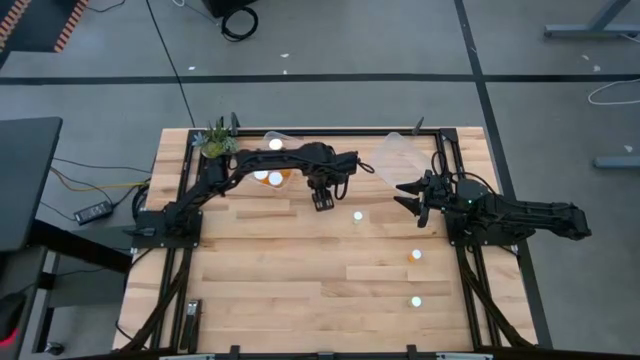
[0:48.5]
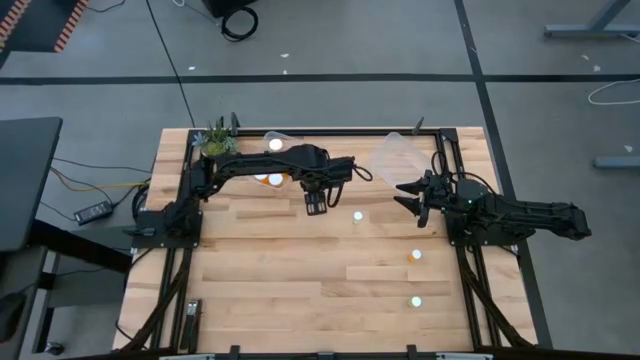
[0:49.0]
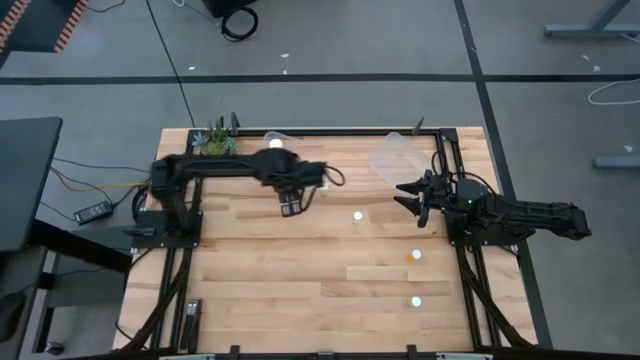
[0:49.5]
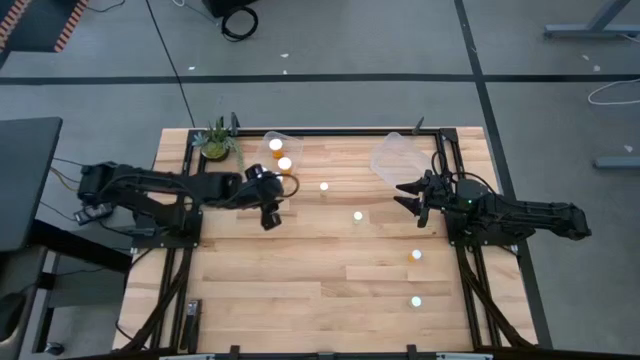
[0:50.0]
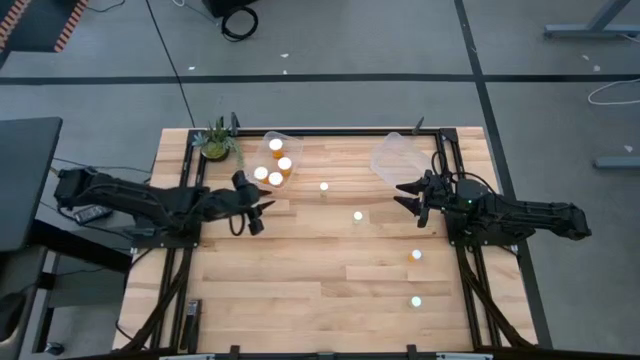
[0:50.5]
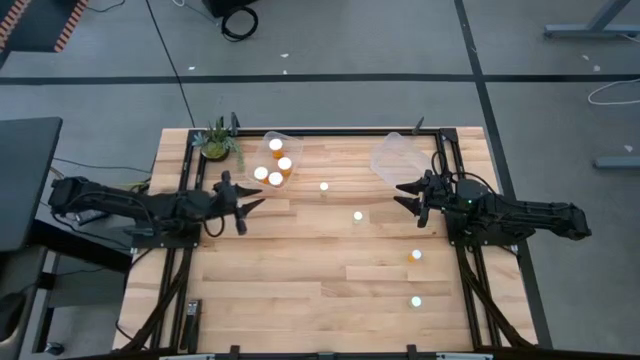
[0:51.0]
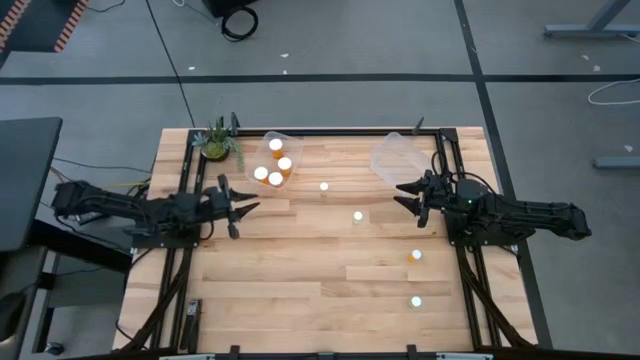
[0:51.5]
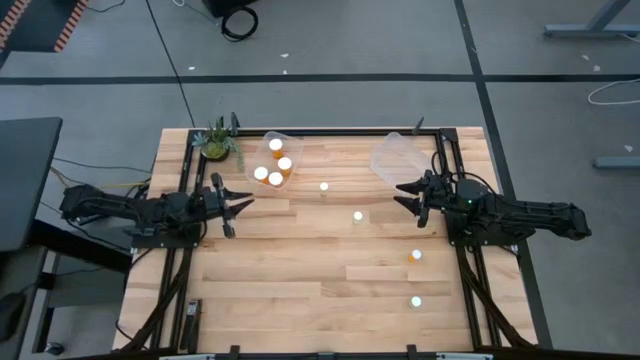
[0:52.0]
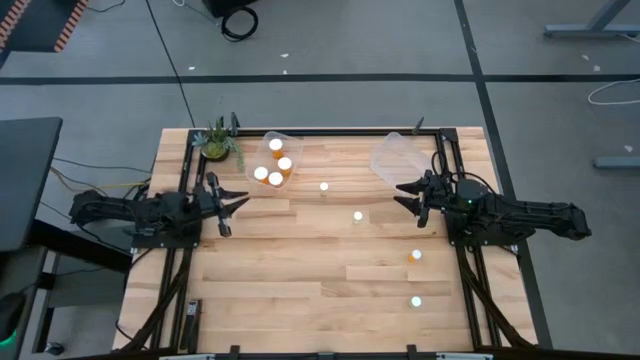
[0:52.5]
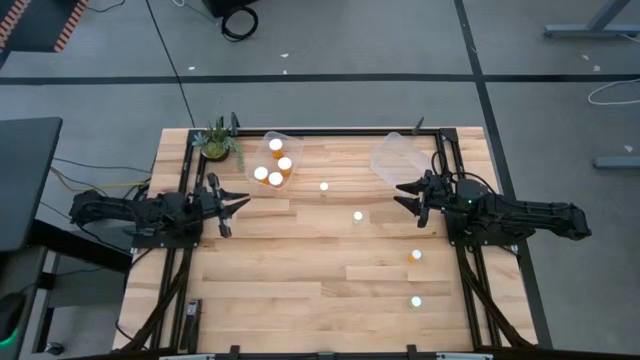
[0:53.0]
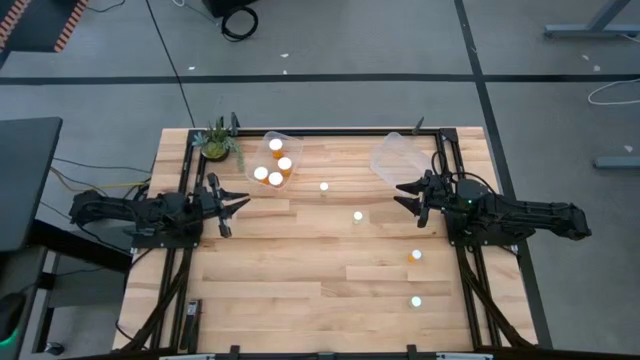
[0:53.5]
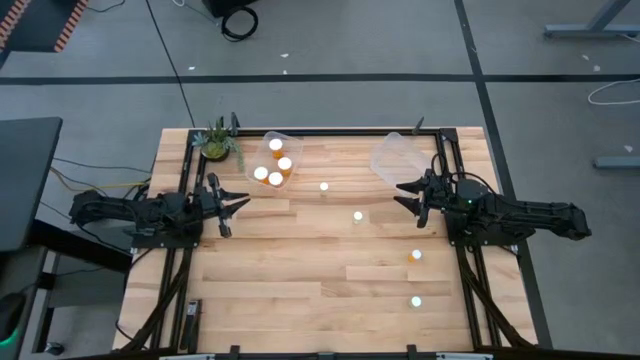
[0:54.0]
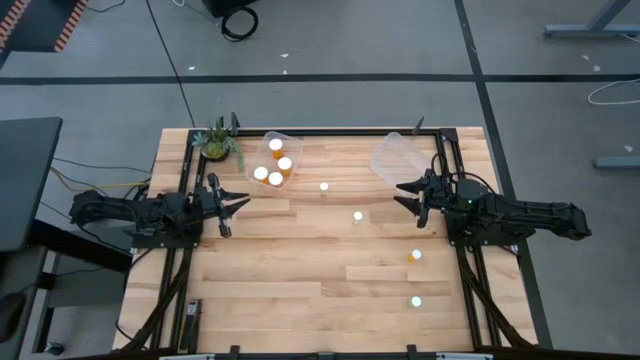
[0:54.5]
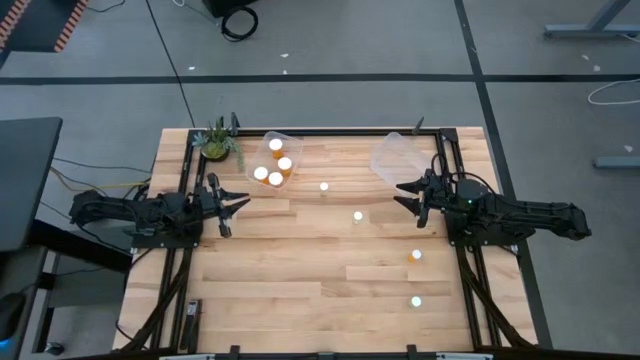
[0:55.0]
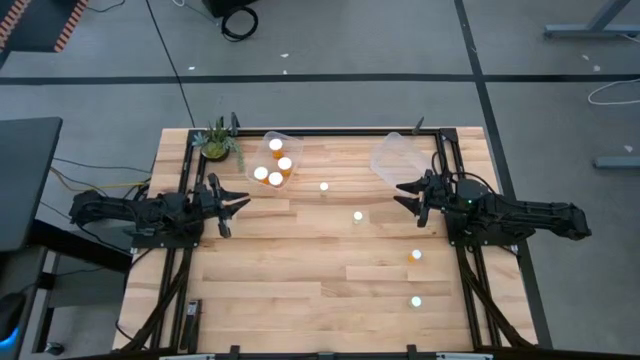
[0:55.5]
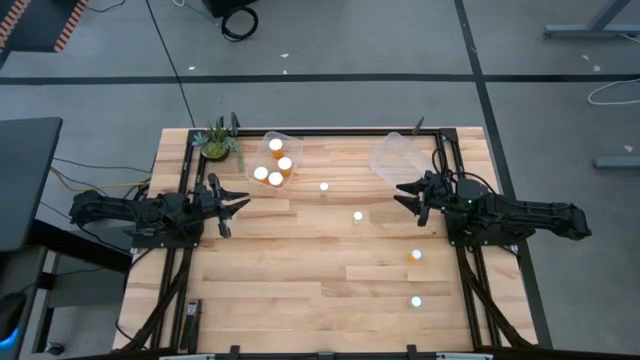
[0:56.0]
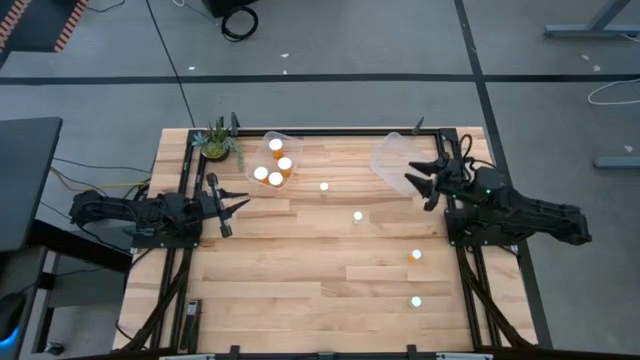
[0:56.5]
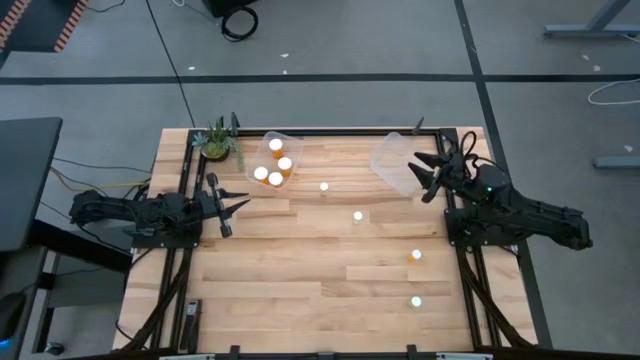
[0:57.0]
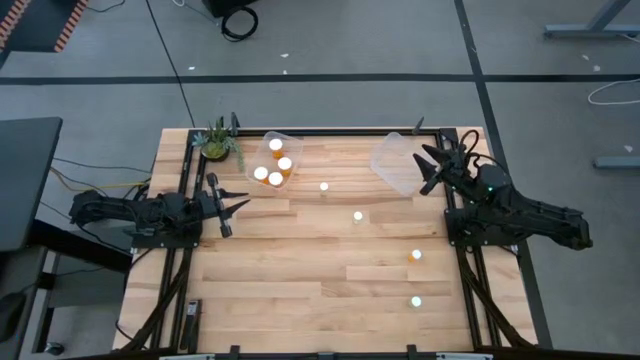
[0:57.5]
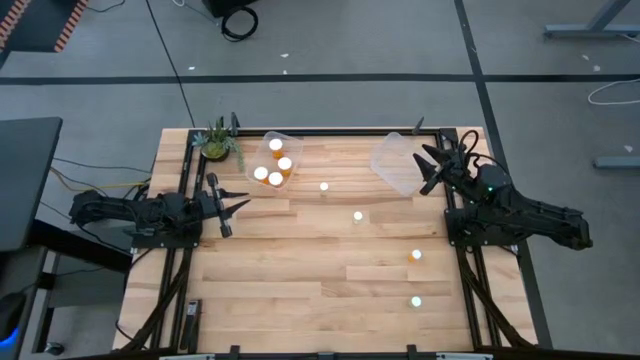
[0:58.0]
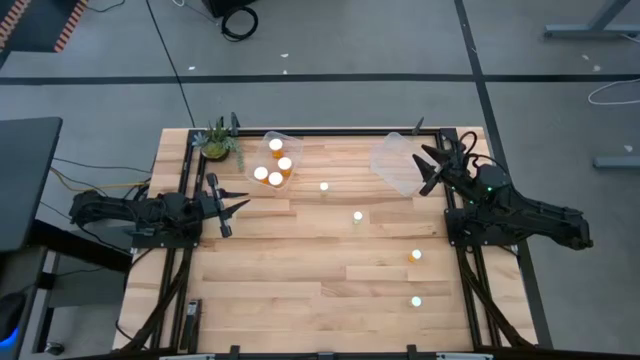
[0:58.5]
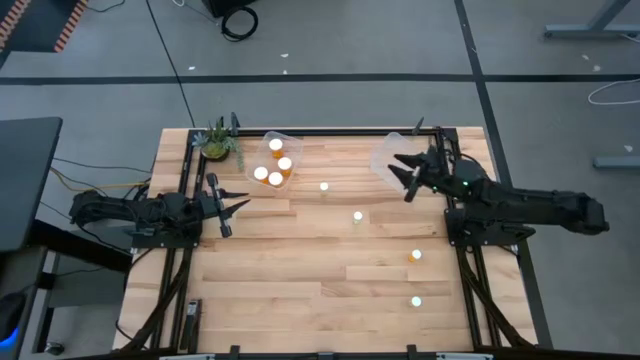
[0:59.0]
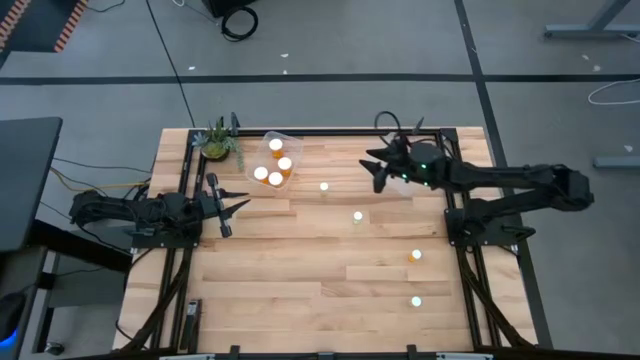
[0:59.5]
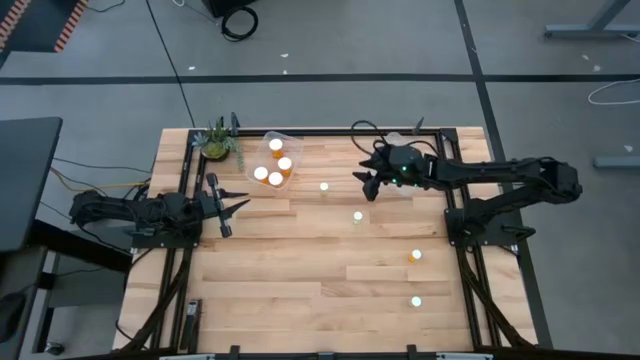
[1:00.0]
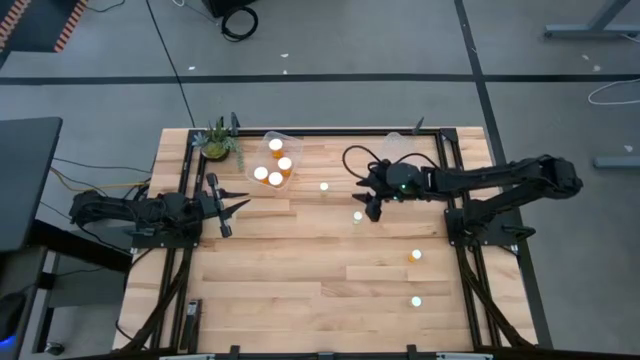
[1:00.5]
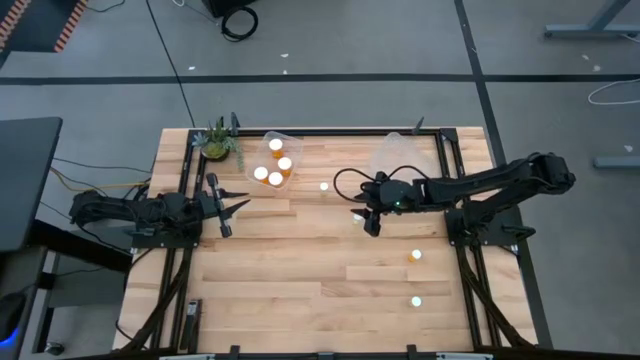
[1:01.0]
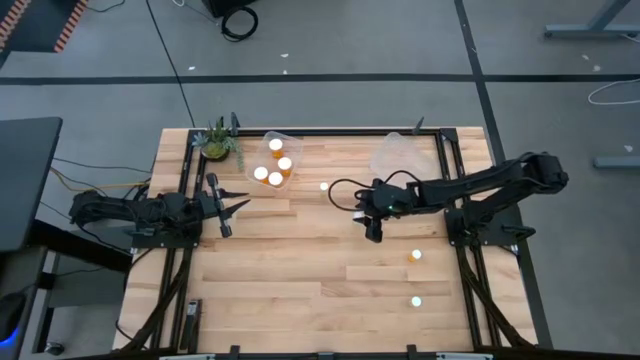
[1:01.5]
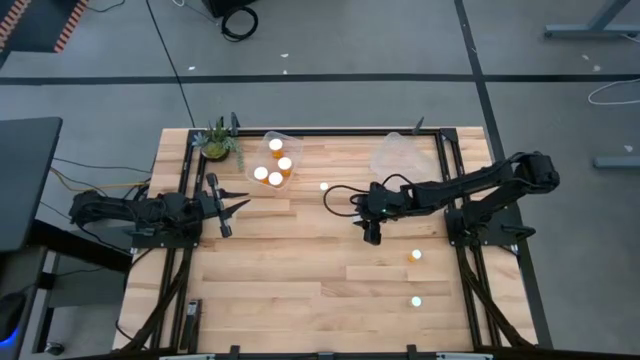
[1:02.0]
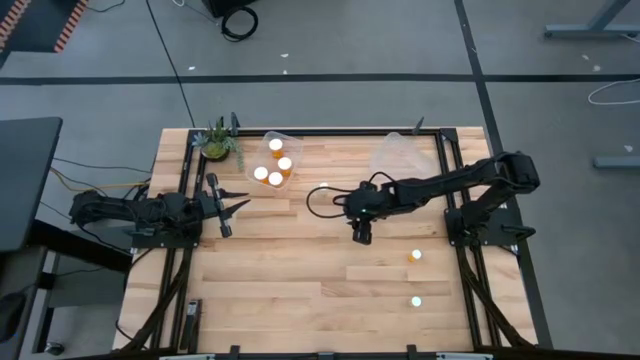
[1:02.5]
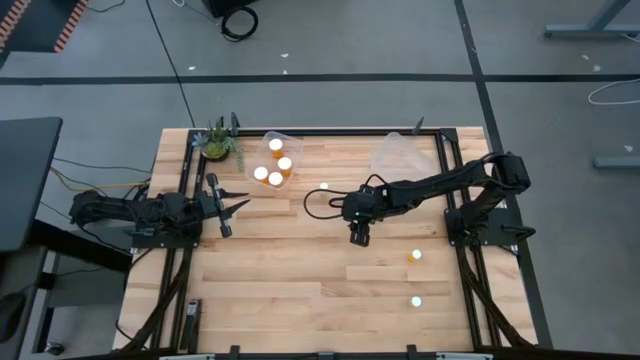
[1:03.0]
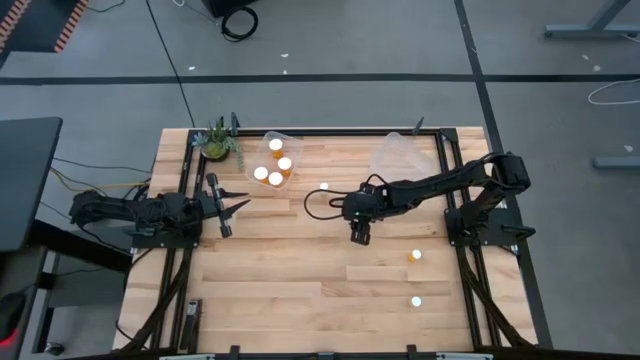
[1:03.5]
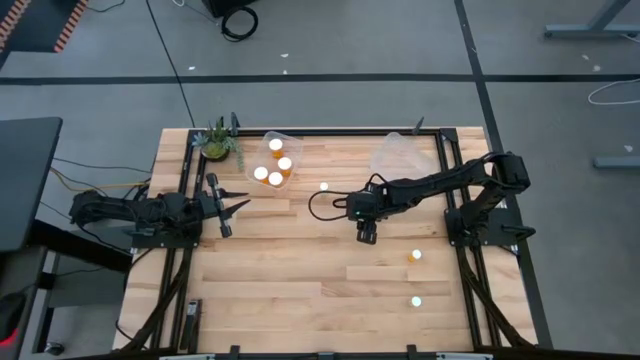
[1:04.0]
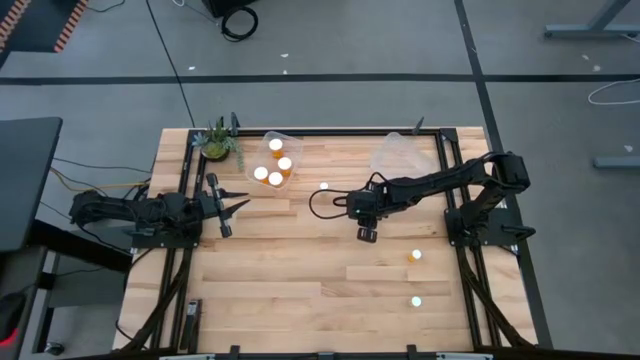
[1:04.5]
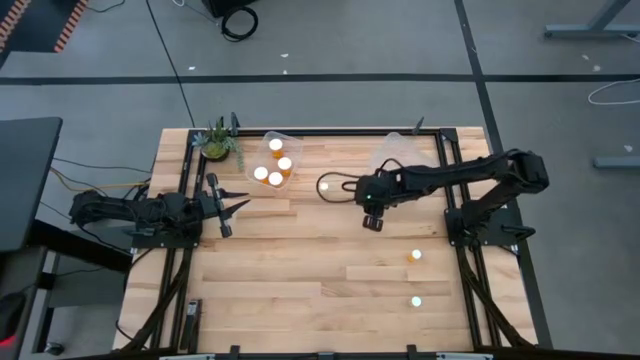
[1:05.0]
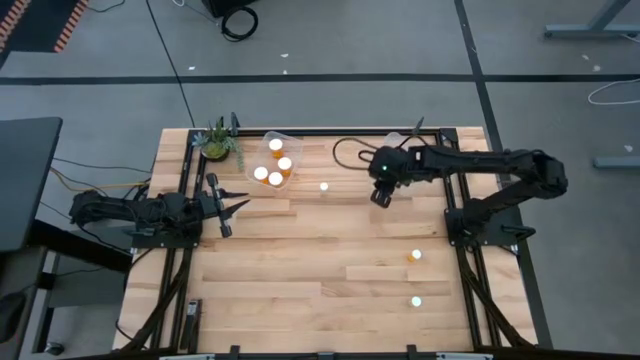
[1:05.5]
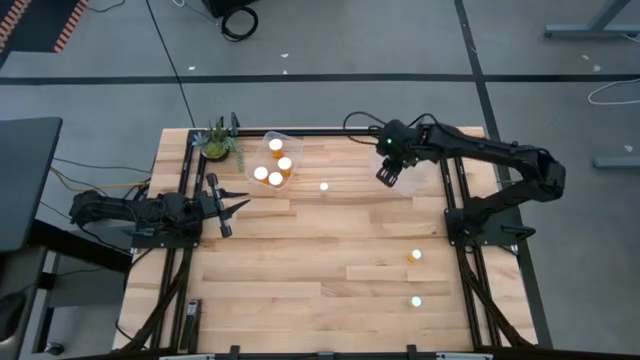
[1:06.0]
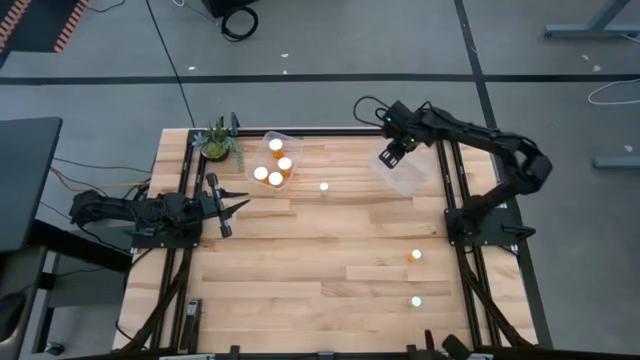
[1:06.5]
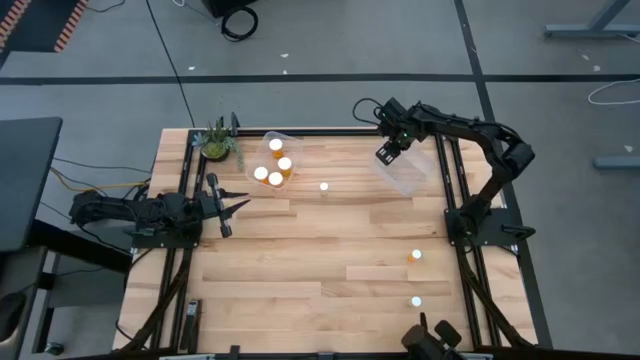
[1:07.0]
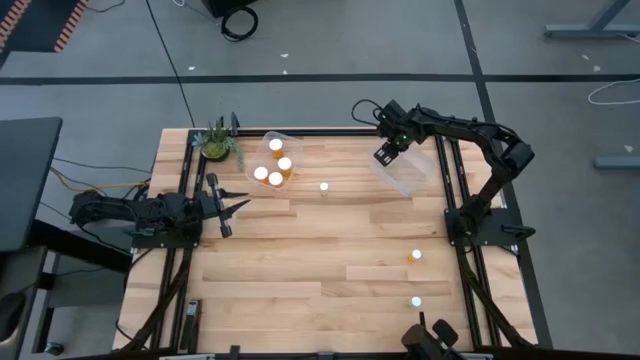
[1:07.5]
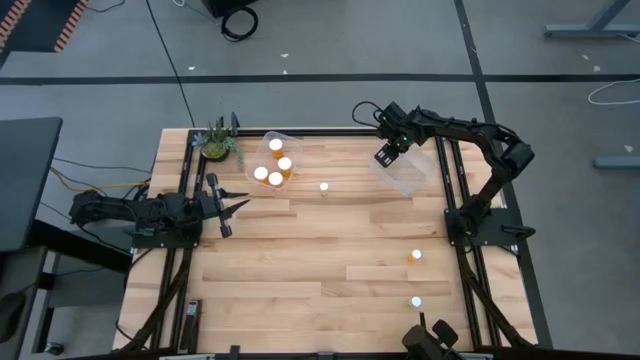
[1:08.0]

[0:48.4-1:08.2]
Task: Pick and place medicine bottles into bin by pill shape (circle, oval)
Put the small yellow pill bottle into the right transparent bin

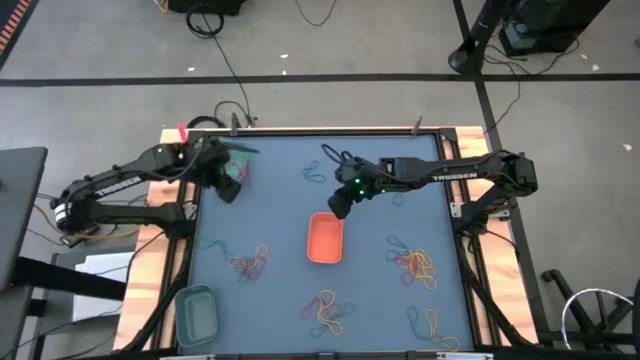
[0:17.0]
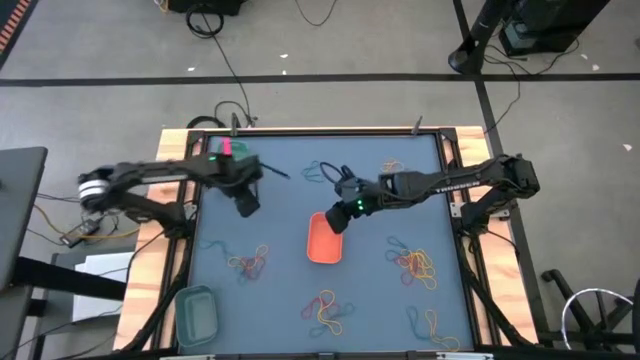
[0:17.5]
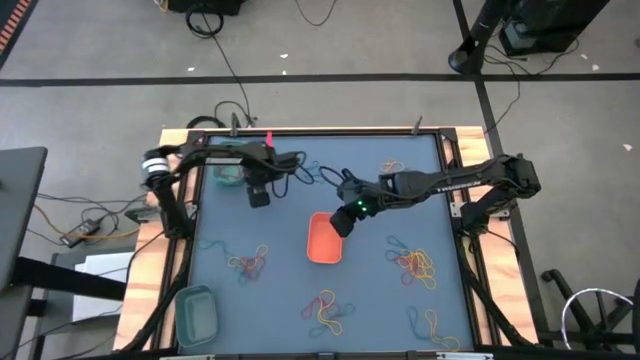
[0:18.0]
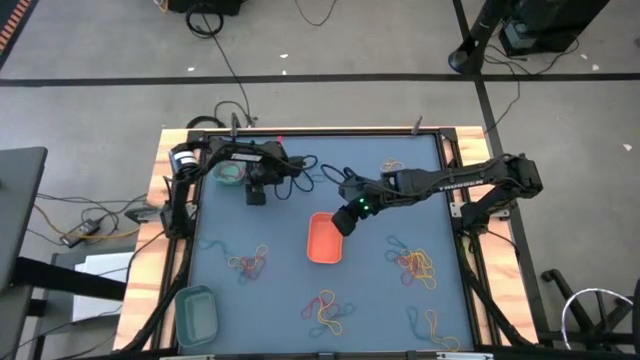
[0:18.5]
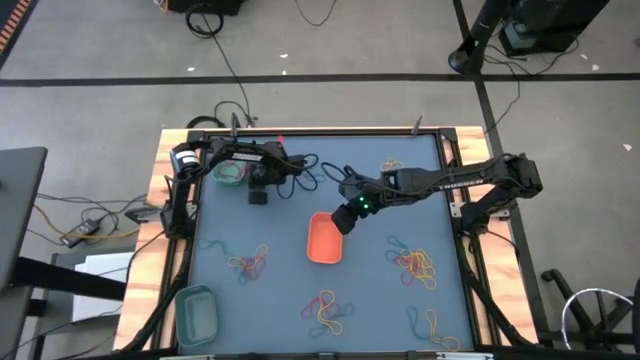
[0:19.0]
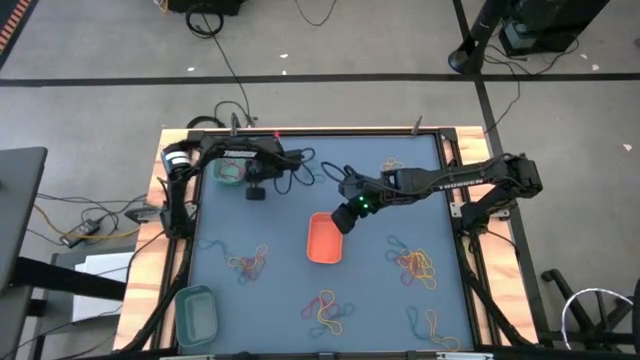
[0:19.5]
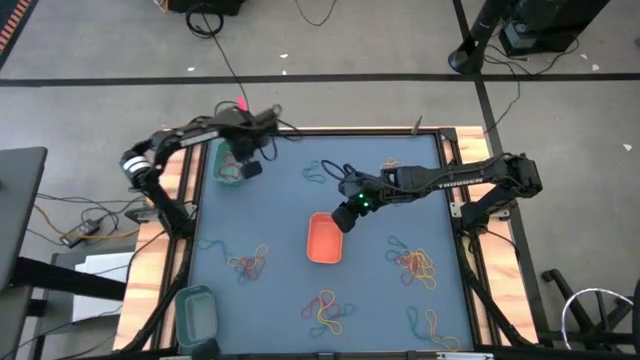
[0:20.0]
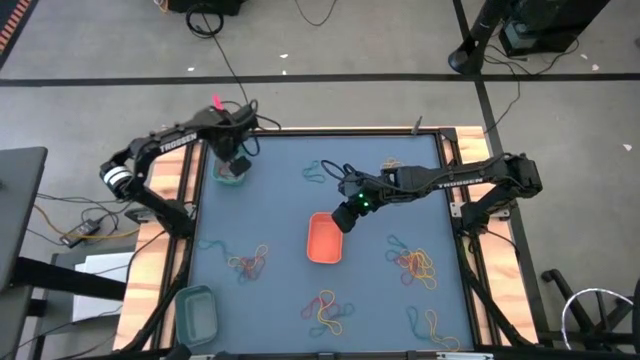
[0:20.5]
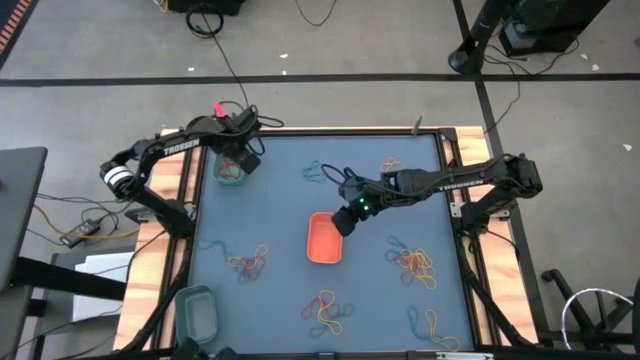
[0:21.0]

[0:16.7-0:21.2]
Task: Sort rubber bands into baskets
Put the red rubber band into the green bin
